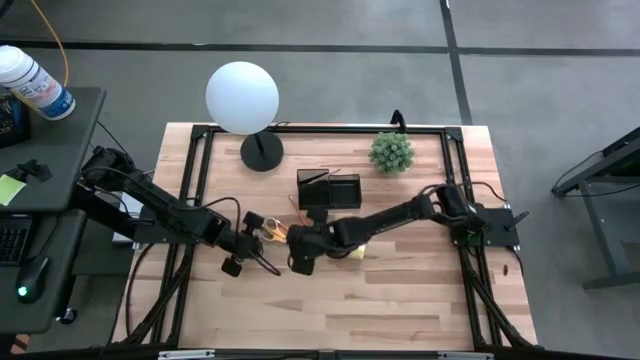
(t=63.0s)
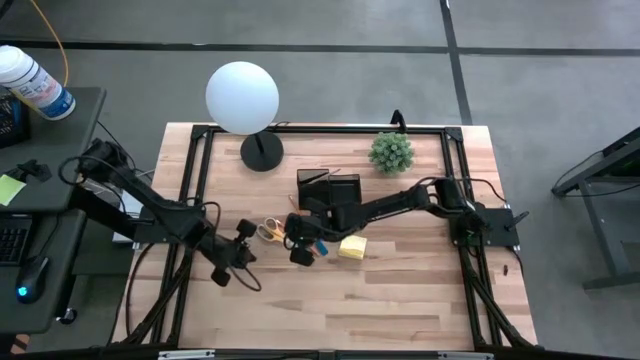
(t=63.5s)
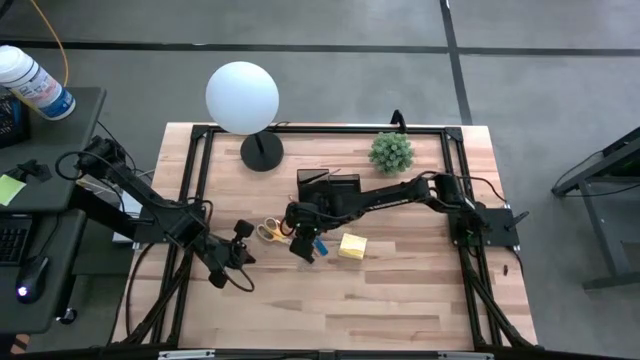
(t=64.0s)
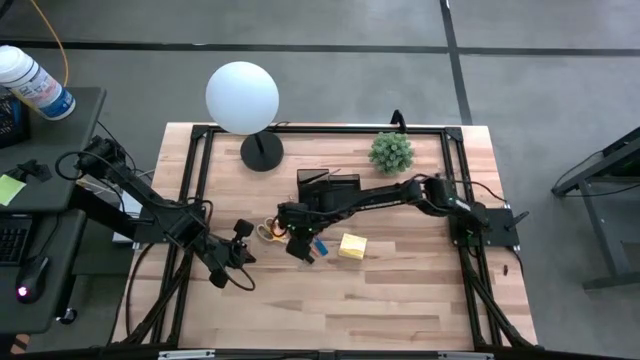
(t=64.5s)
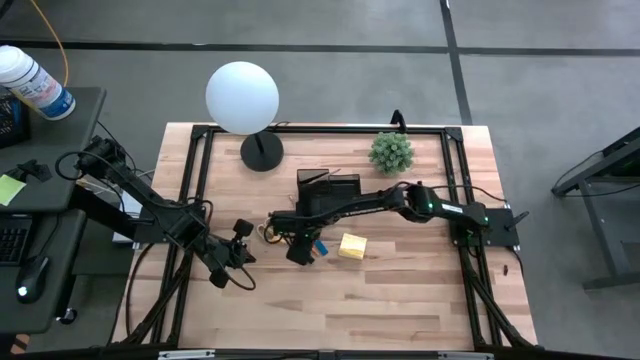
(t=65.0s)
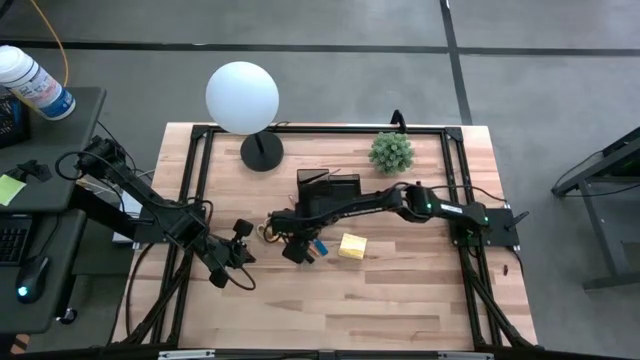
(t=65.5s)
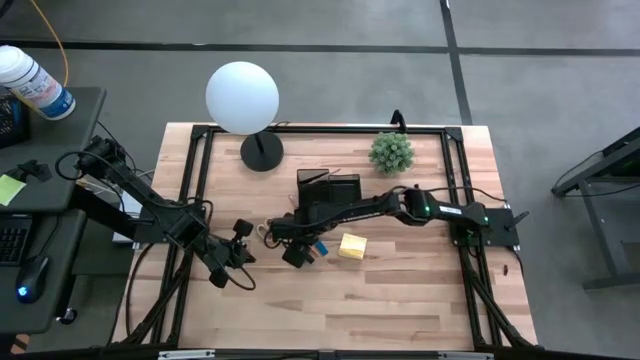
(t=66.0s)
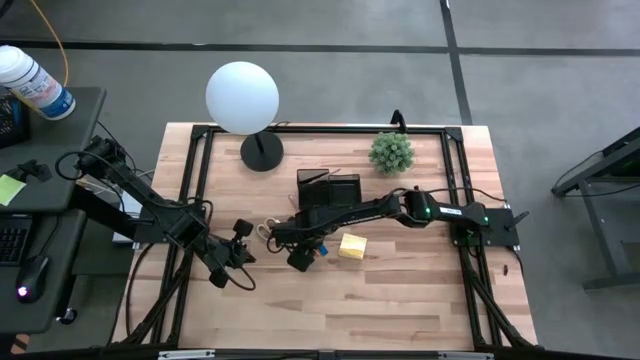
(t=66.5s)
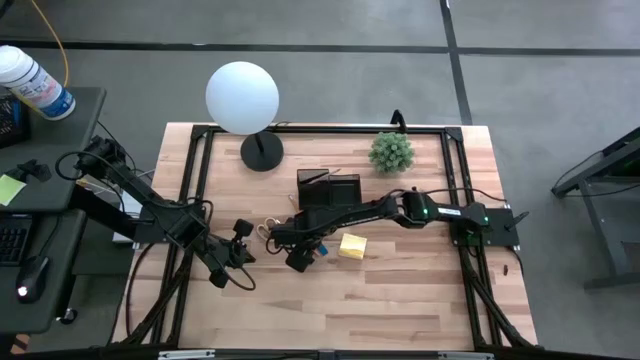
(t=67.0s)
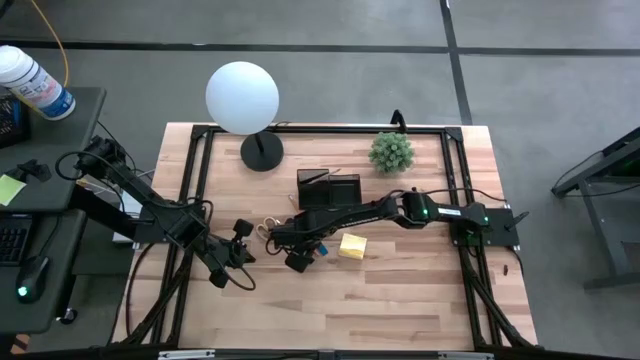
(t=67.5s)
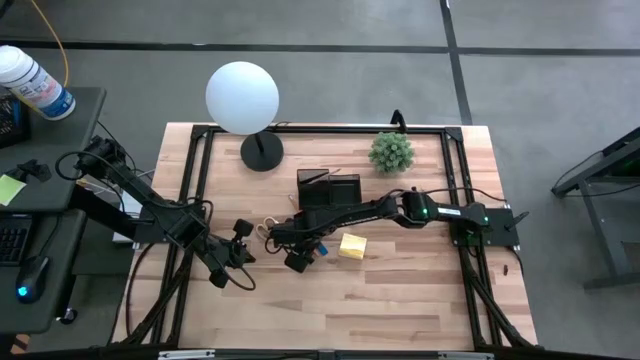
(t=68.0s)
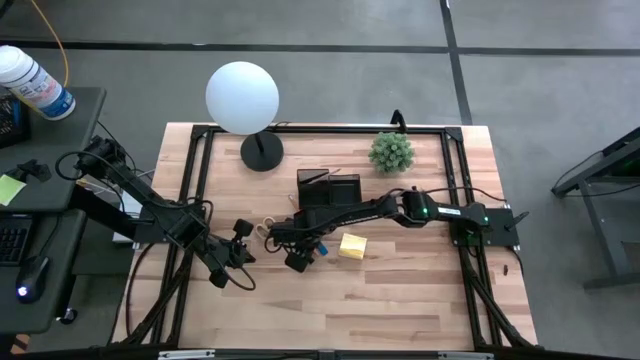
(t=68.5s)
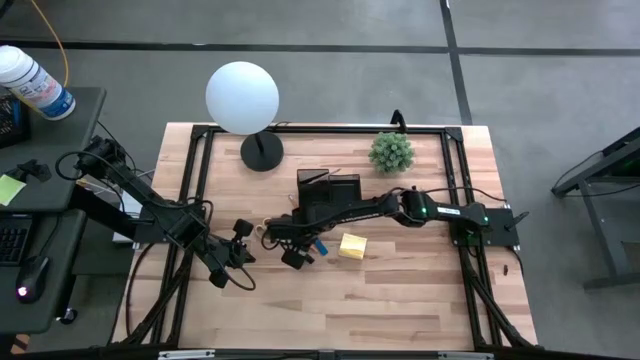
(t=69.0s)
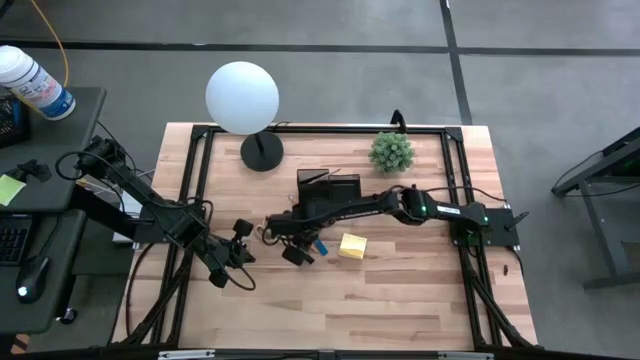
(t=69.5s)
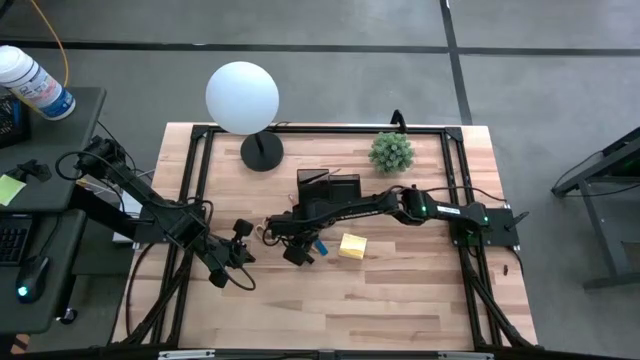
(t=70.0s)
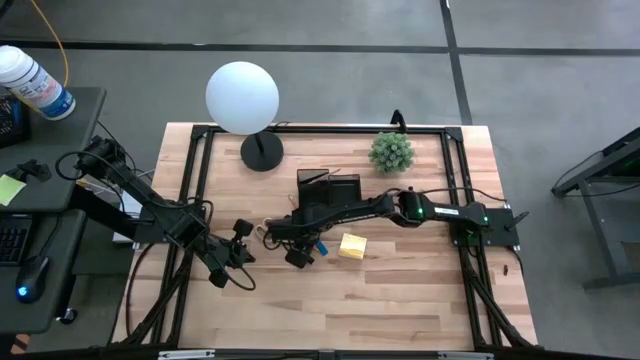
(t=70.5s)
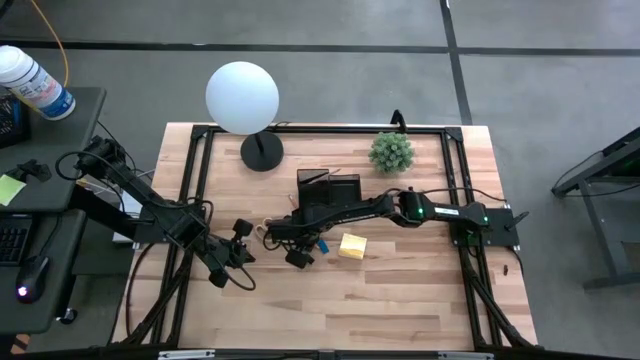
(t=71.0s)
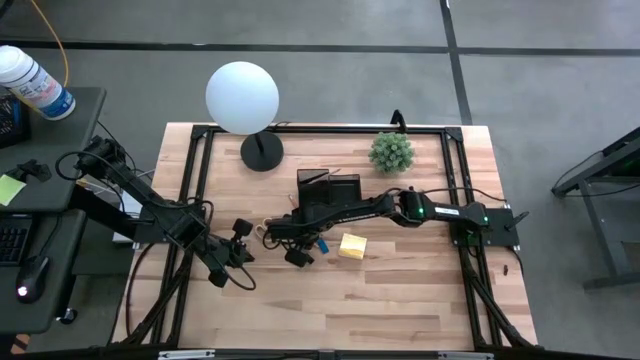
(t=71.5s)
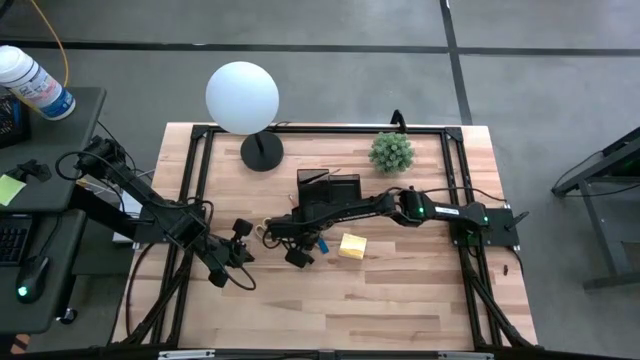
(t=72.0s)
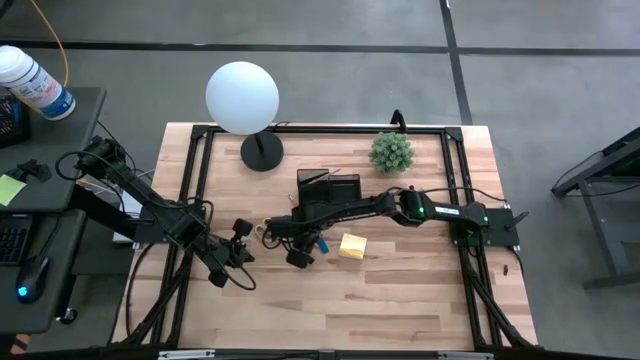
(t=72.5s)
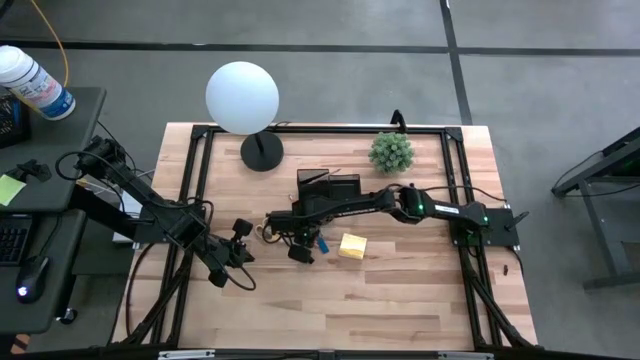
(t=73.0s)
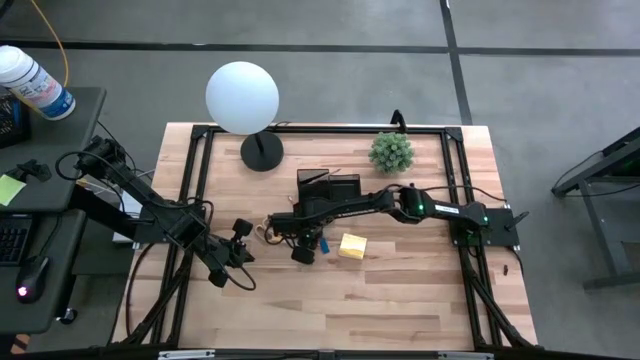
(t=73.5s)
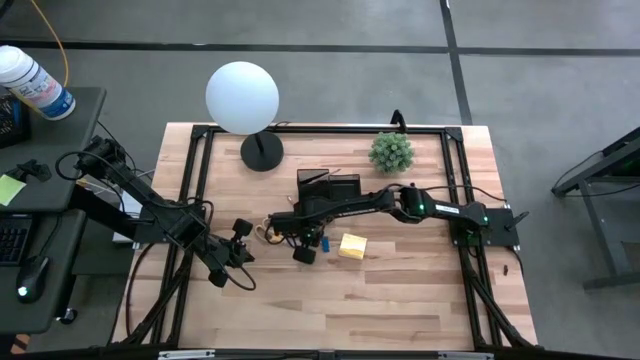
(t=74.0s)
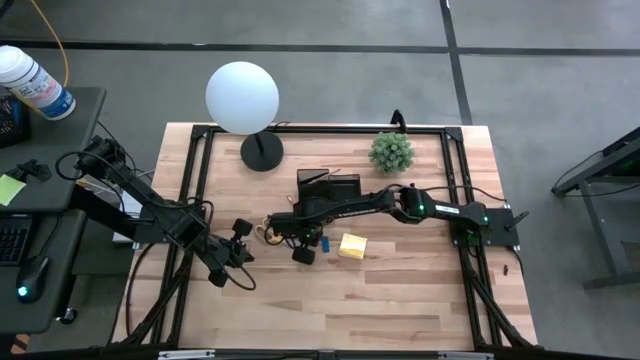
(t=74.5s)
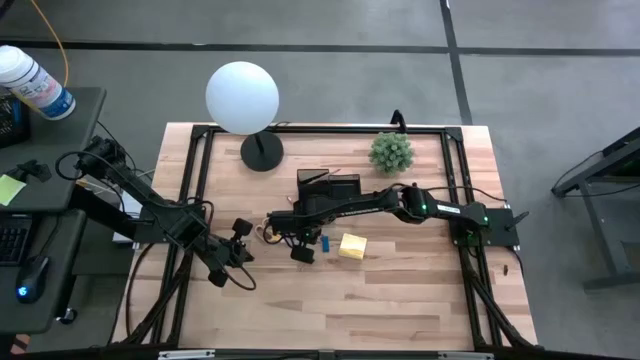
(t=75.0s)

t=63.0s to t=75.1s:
Task: Pick and place office supplies into organizer
Put the bottom yellow pencil into the black organizer

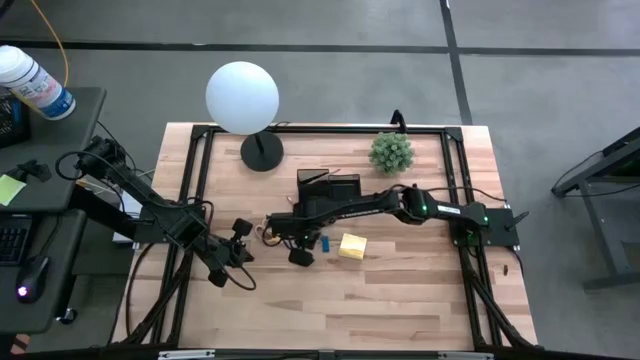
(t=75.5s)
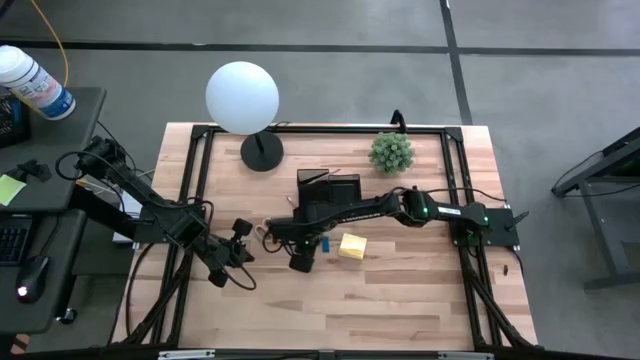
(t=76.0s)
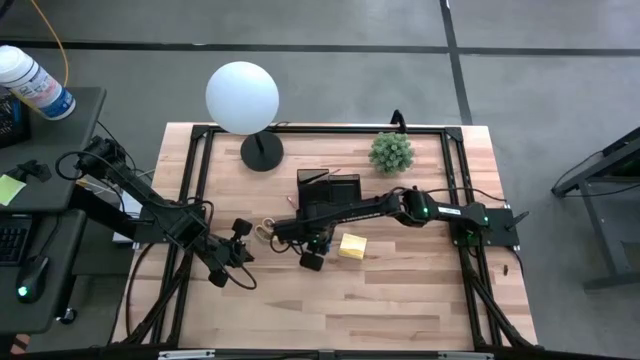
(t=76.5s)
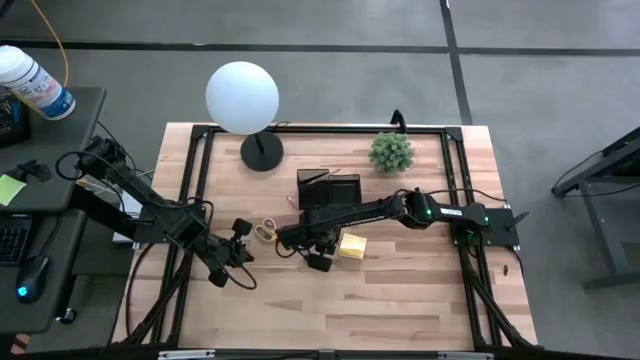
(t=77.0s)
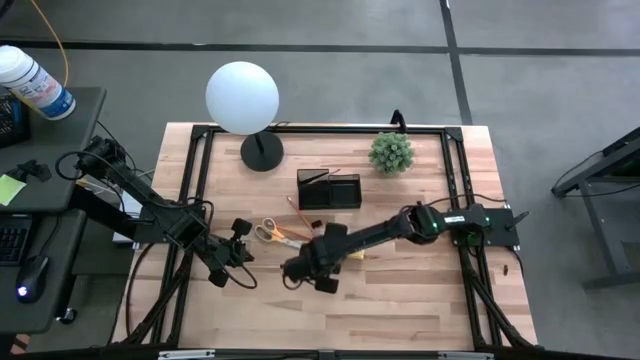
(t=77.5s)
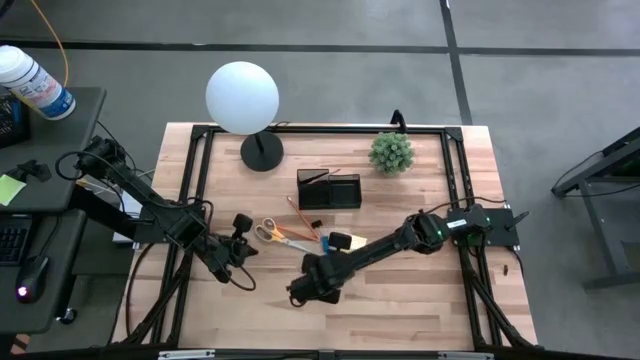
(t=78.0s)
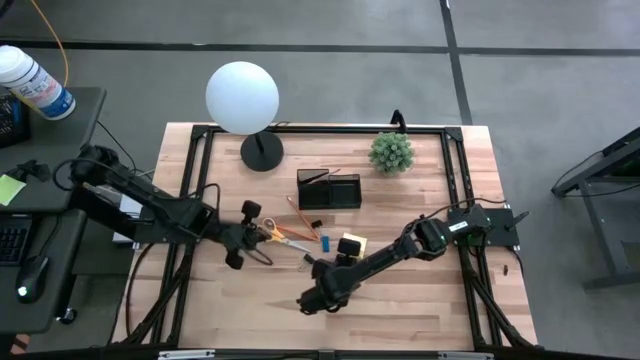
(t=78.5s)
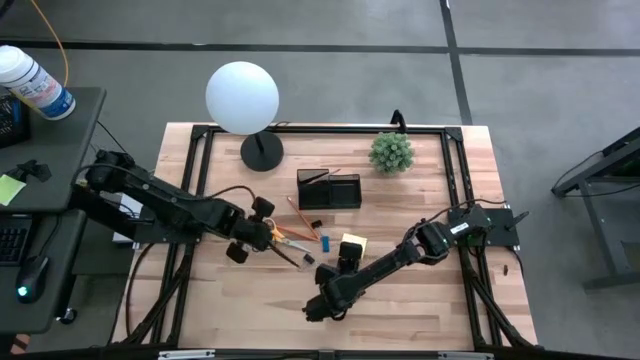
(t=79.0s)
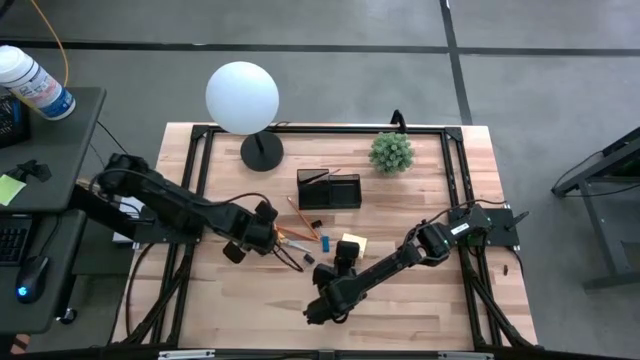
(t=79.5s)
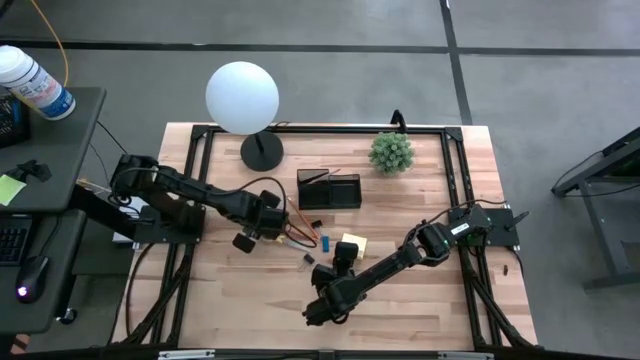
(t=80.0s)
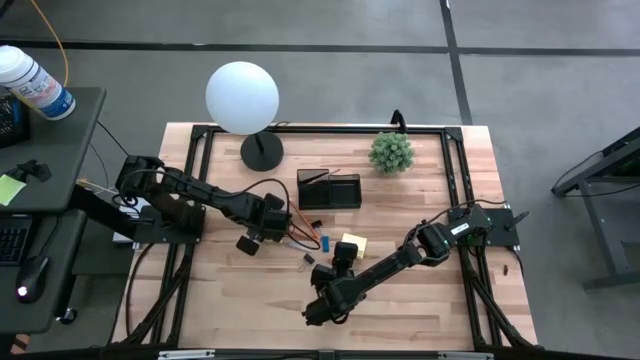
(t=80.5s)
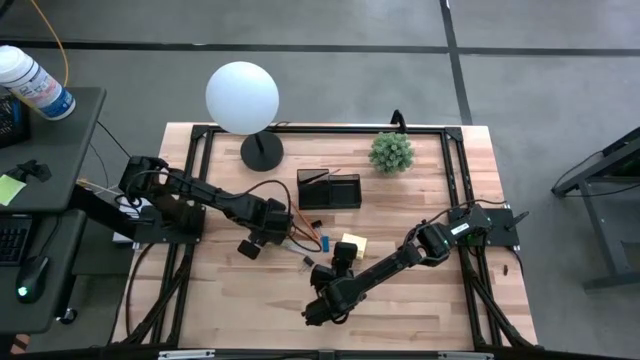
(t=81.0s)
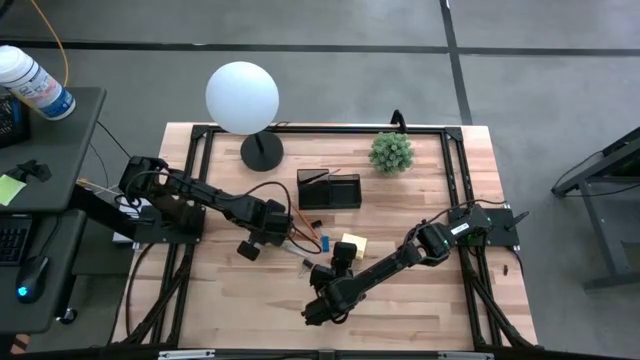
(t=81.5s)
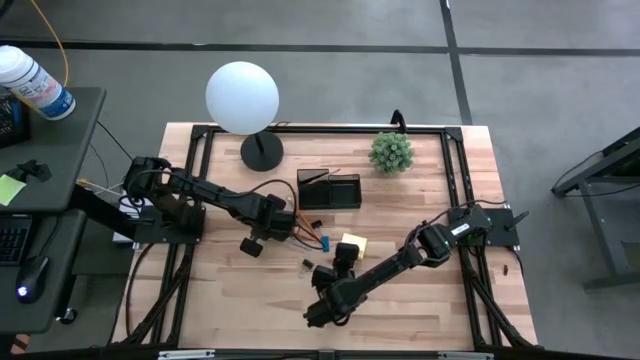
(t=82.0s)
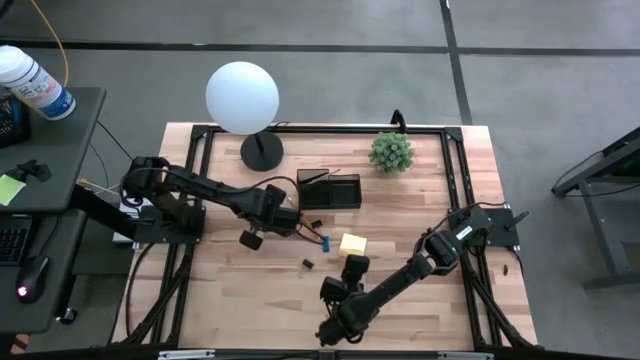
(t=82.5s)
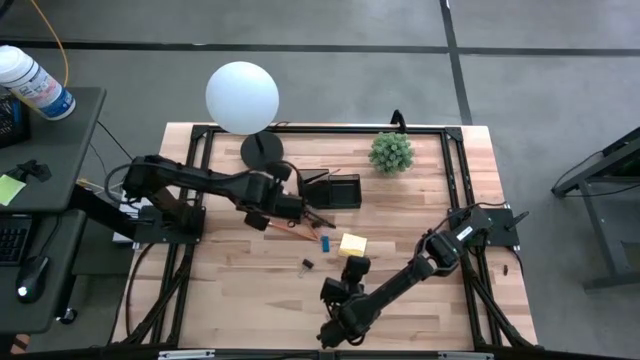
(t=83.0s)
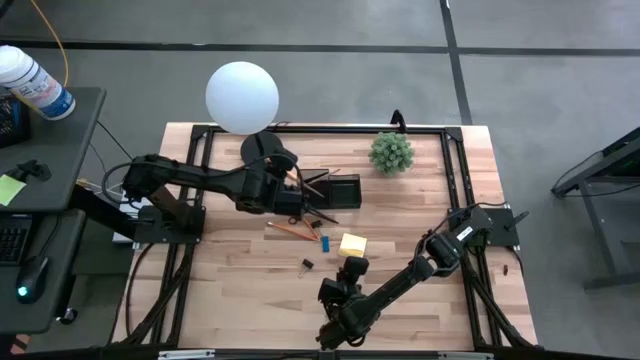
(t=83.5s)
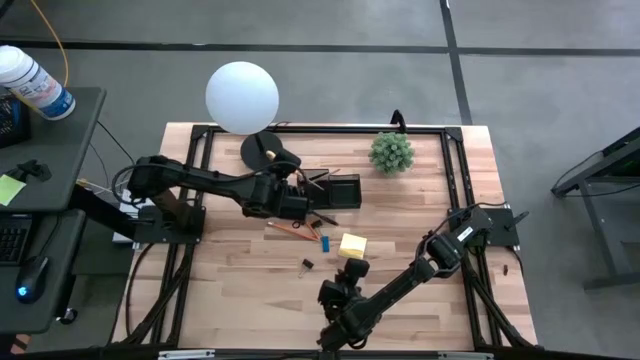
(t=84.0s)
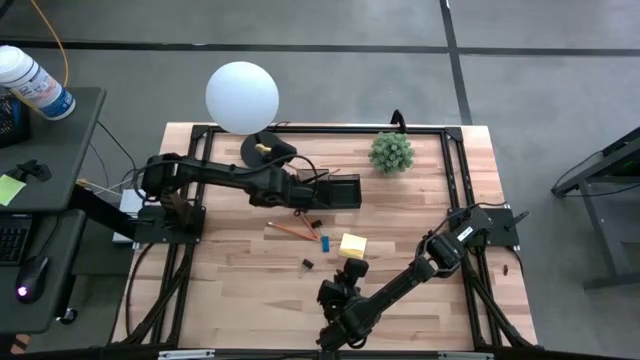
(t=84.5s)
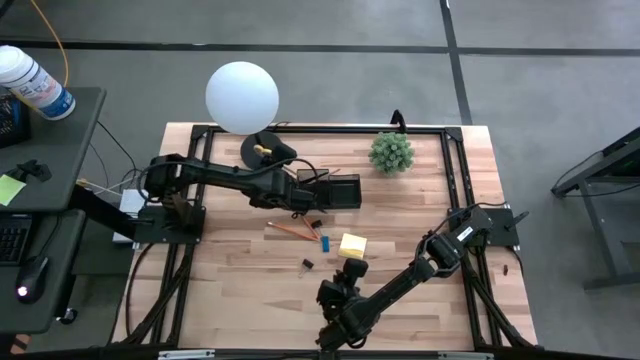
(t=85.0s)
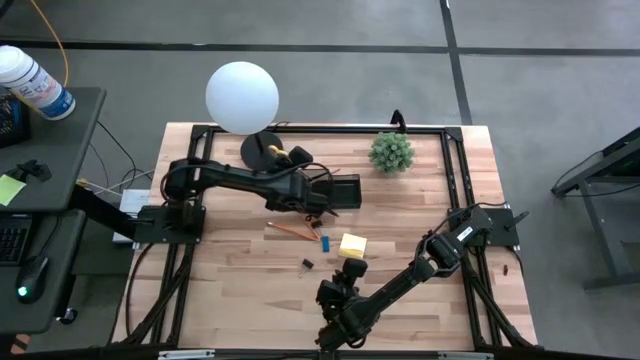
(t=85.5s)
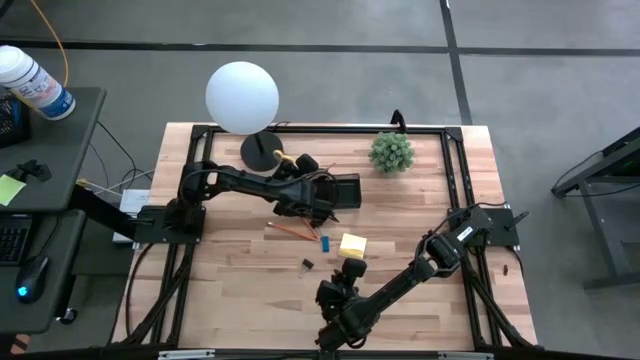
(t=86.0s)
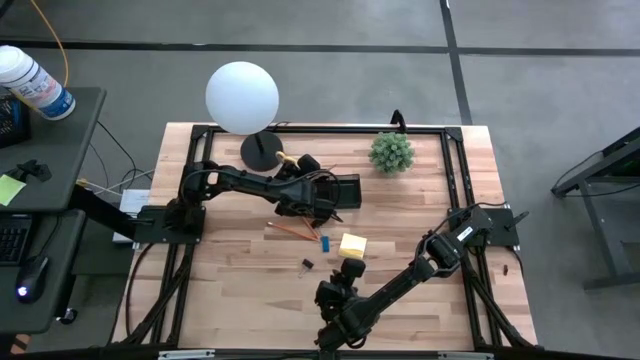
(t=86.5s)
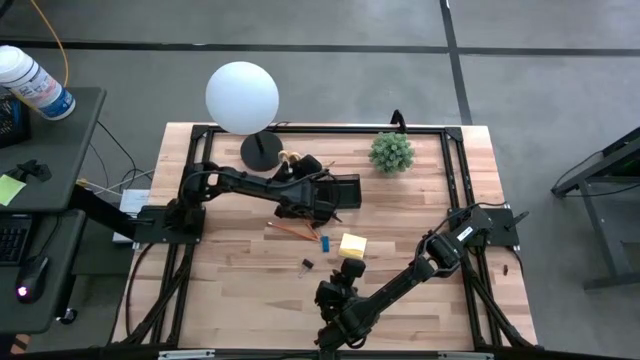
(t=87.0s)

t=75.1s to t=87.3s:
Put the yellow scissors into the black organizer
